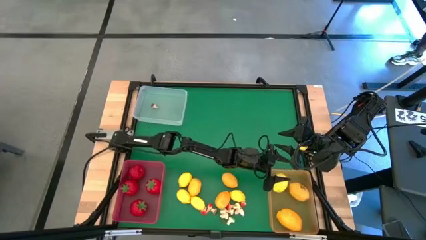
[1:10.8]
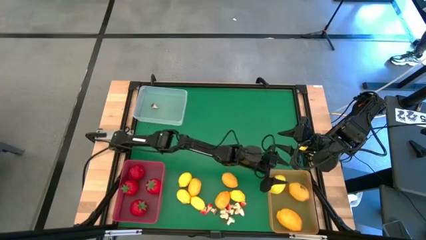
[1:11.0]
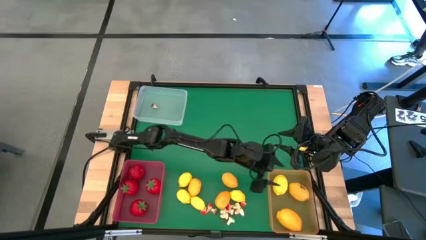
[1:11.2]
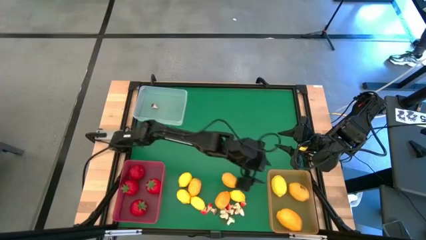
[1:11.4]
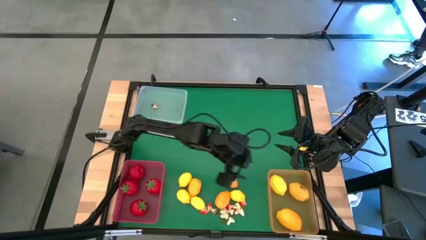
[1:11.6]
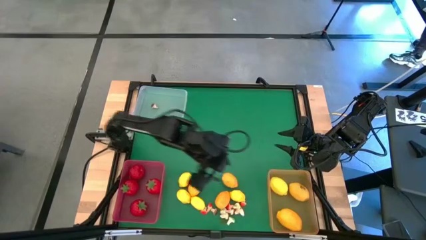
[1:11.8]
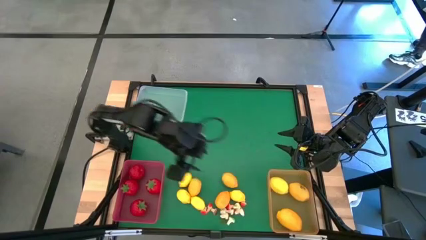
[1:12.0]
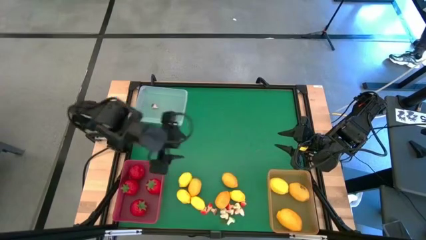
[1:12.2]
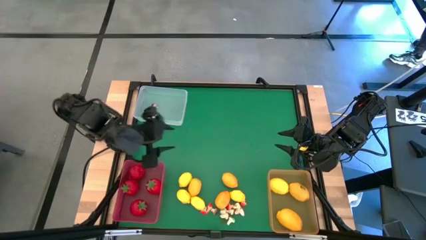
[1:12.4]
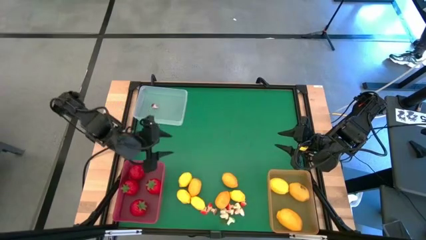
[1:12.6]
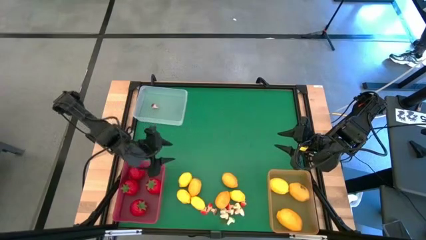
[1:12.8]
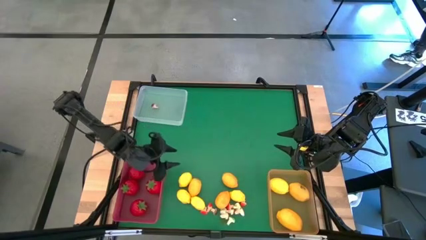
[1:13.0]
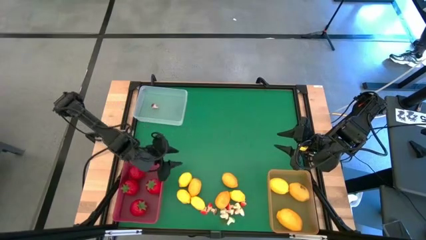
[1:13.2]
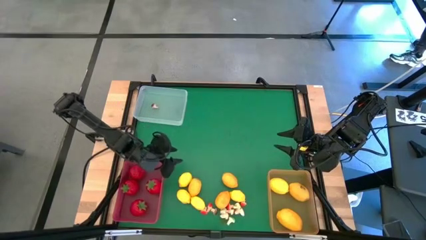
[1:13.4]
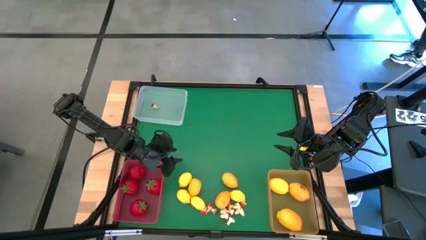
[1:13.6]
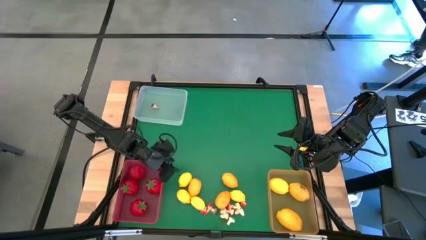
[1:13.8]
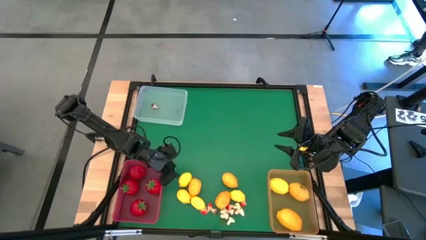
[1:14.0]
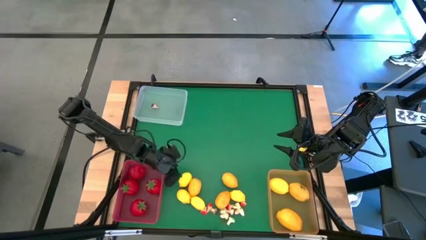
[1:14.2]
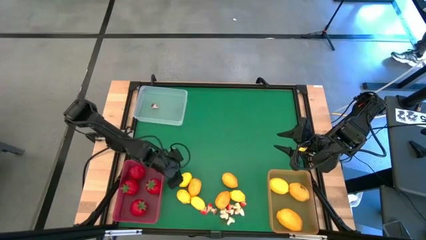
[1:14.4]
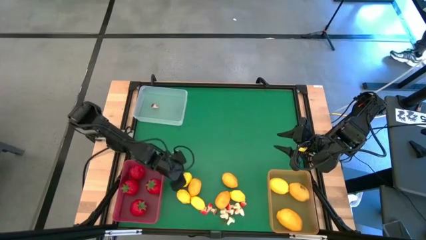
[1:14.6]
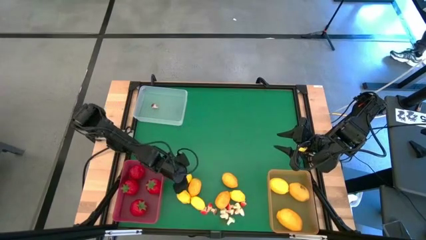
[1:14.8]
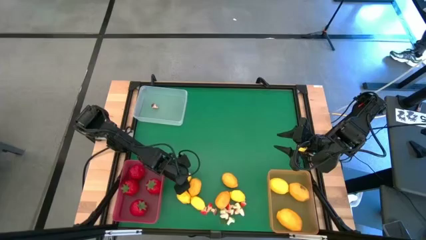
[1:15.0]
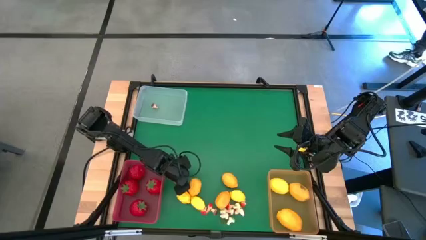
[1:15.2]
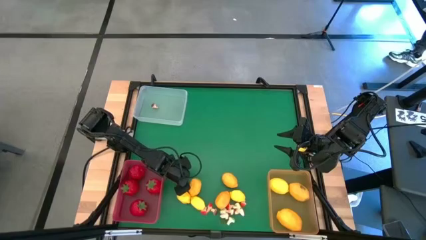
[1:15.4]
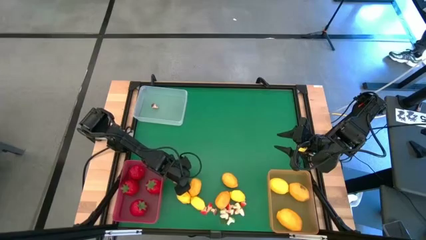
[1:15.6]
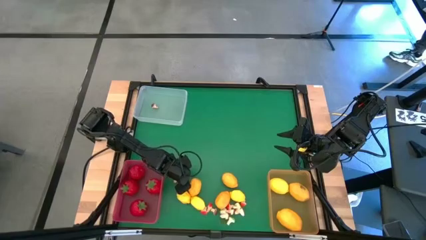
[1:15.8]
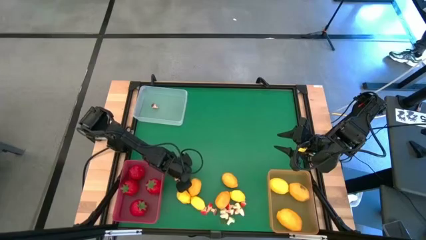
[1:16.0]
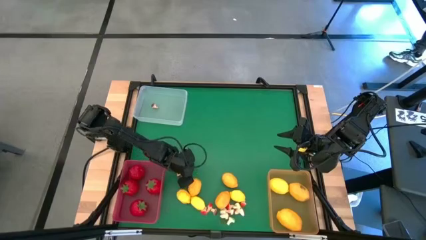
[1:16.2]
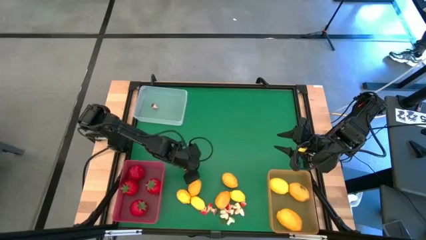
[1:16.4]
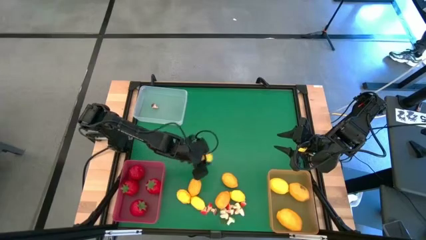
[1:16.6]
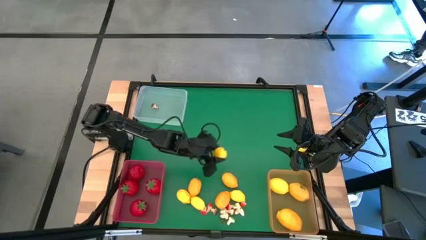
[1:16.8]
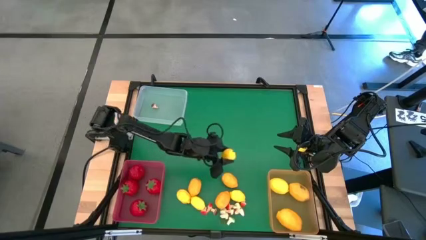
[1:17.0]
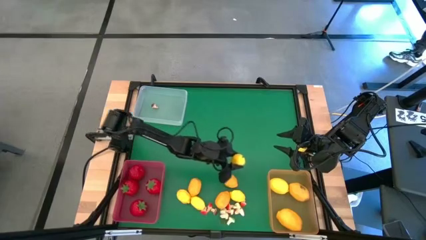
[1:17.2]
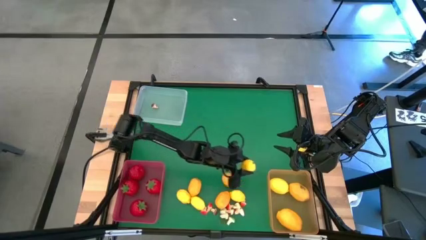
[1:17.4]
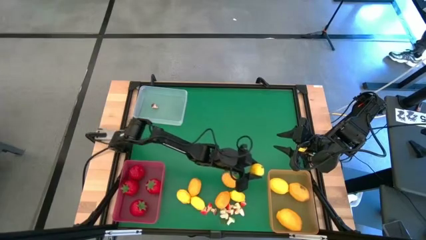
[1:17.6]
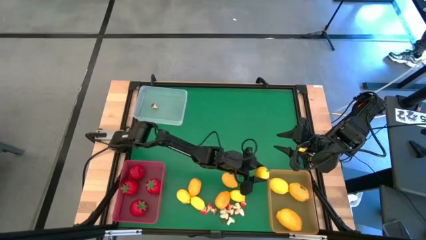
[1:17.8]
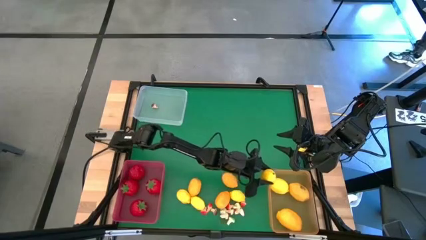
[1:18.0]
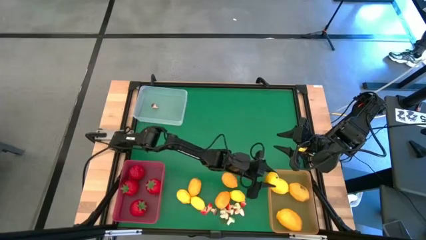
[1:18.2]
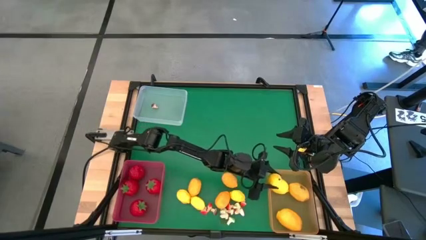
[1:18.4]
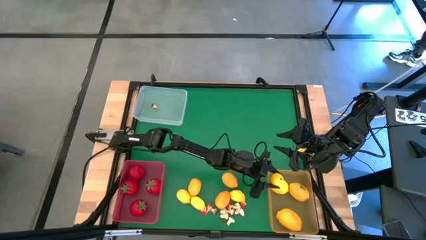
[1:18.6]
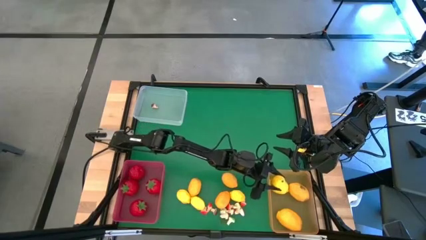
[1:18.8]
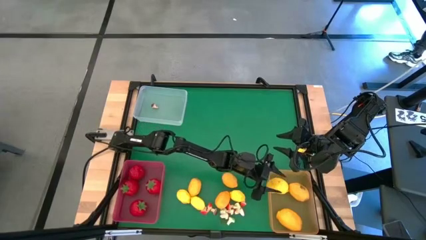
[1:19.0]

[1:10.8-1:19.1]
Task: Sort produce into baskets
Put the yellow lemon into the orange bin

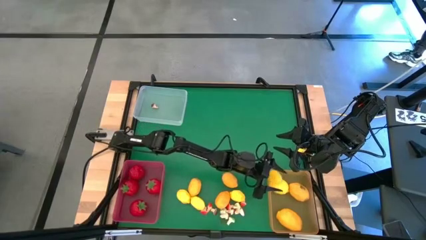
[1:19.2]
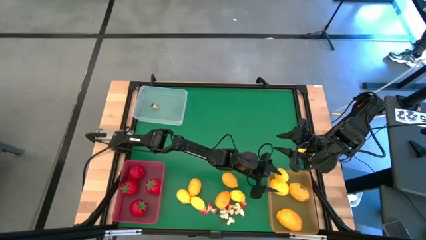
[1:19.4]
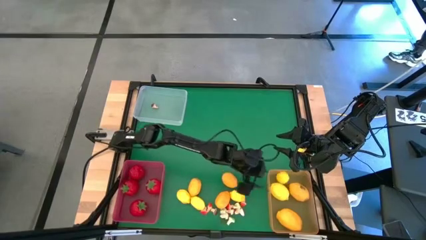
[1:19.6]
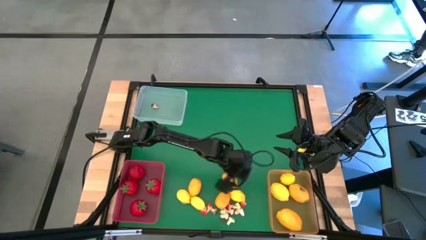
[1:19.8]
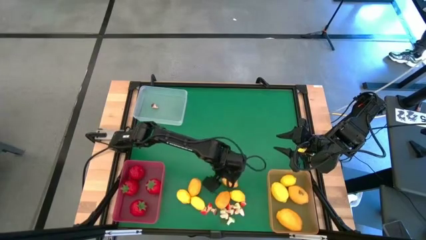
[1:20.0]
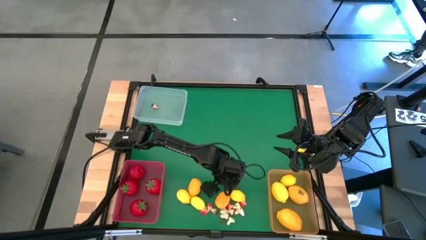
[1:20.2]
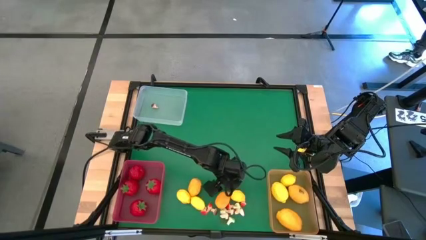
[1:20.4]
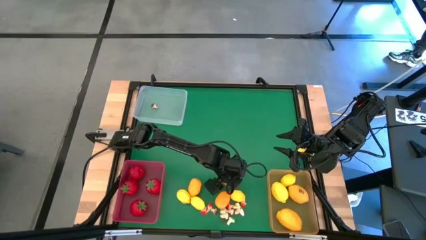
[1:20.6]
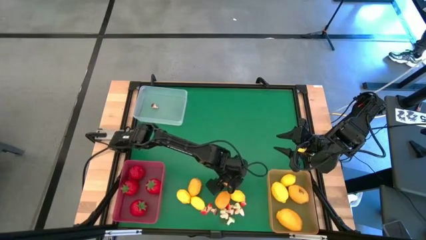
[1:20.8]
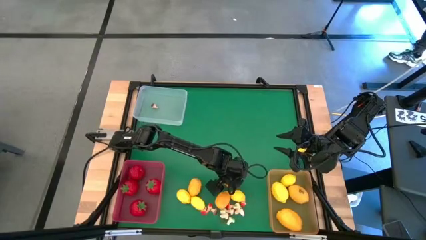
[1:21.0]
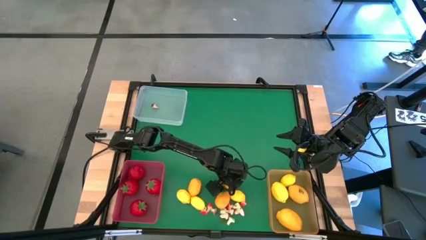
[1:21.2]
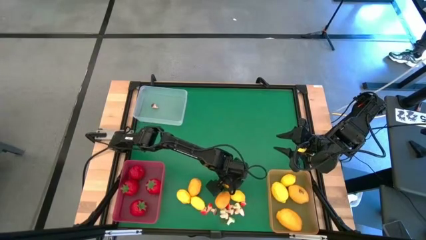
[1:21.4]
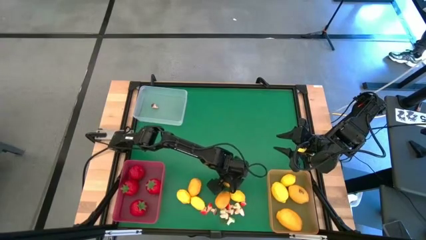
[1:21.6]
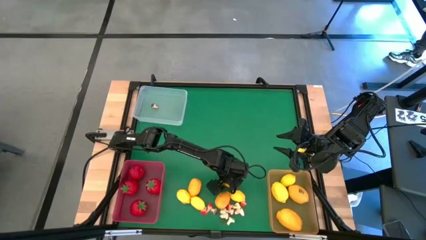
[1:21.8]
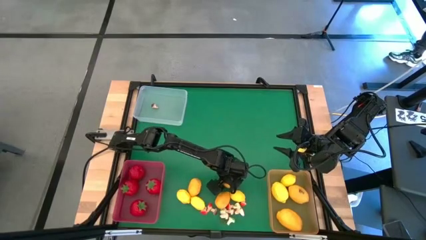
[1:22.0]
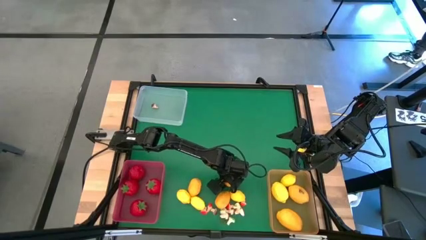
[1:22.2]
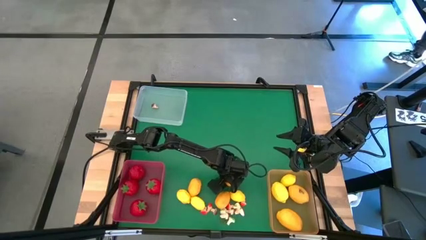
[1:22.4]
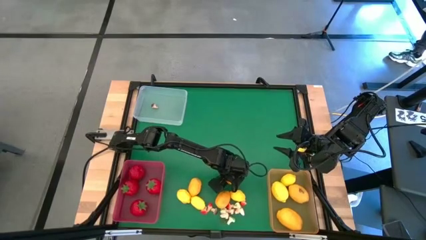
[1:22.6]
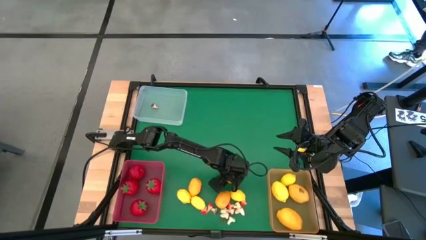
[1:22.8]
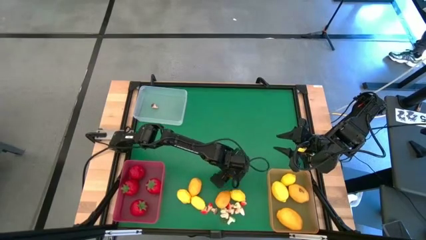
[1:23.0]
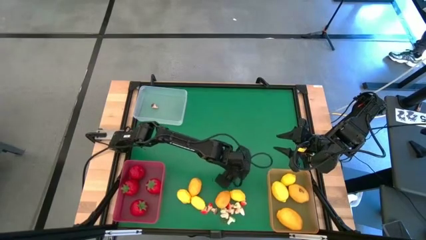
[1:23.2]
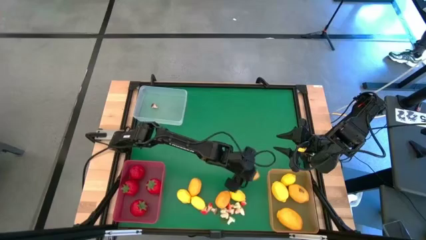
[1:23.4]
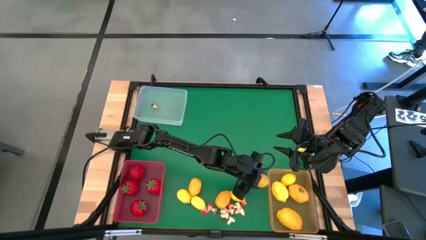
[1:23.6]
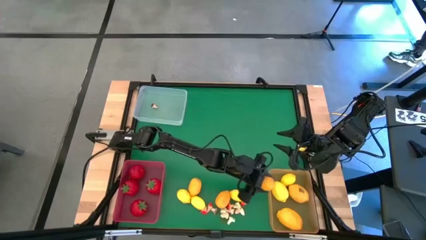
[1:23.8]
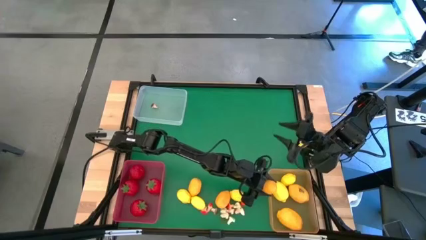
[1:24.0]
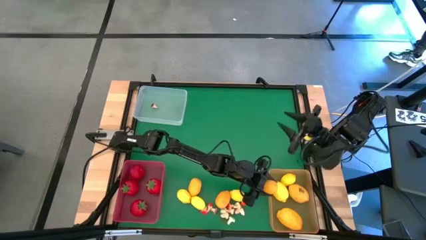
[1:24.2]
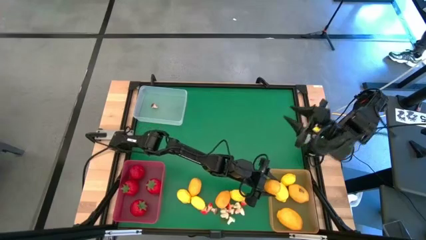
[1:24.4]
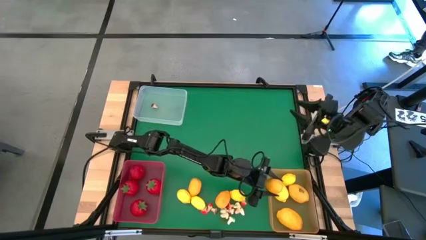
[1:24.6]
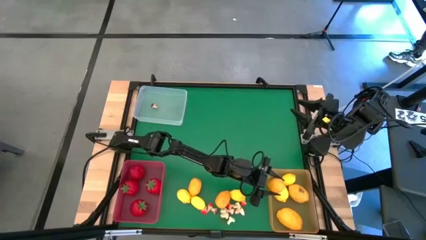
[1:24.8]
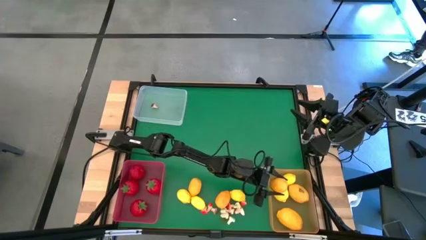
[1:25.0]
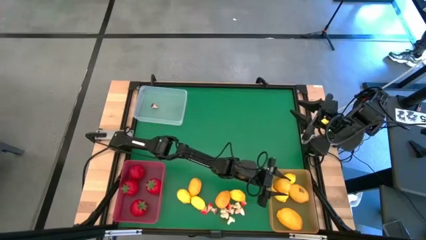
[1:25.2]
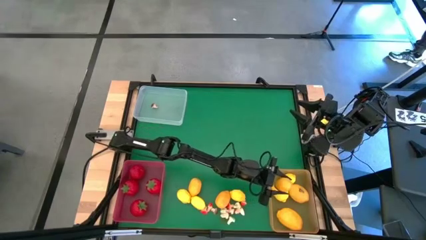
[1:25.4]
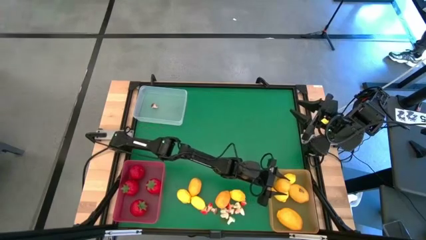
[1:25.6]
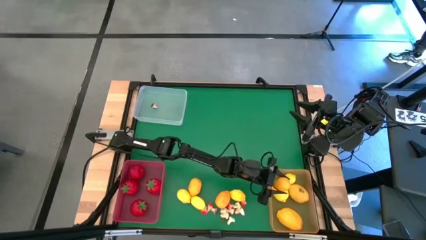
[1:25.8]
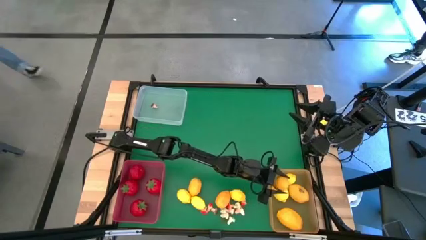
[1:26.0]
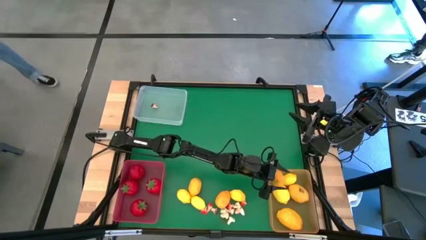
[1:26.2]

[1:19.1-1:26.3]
Put the yellow lemon into the orange bin
